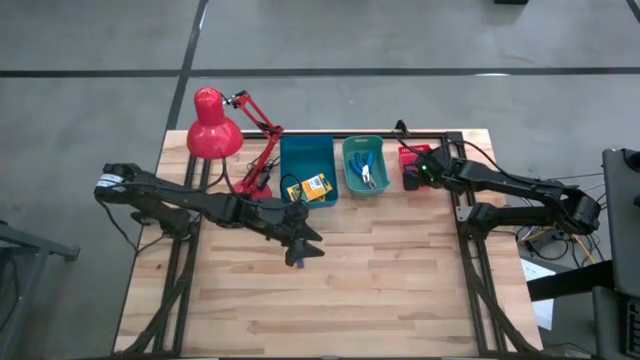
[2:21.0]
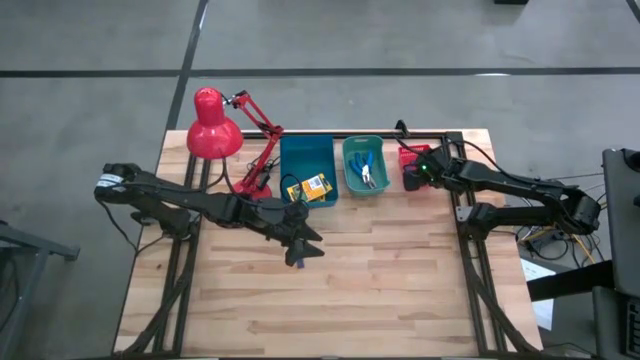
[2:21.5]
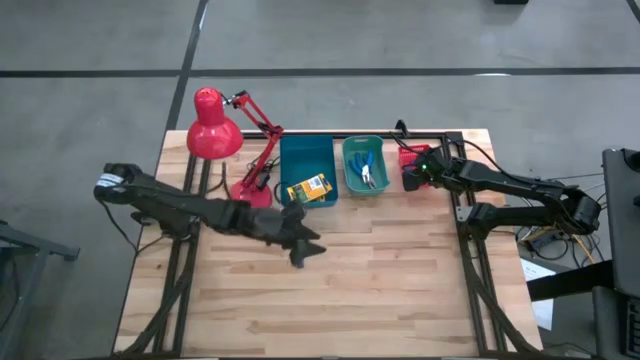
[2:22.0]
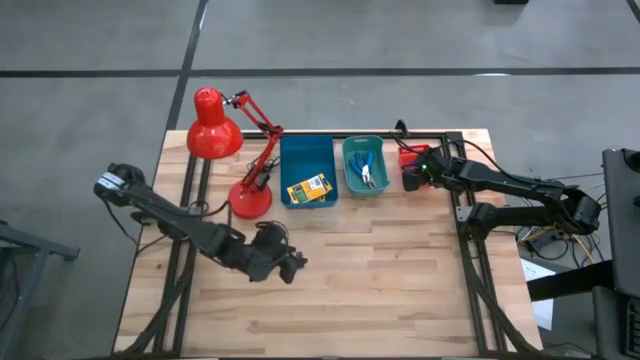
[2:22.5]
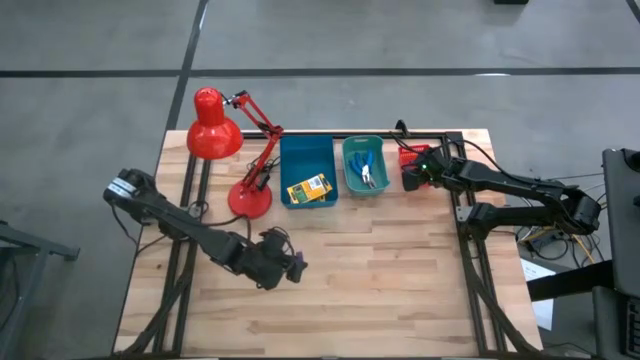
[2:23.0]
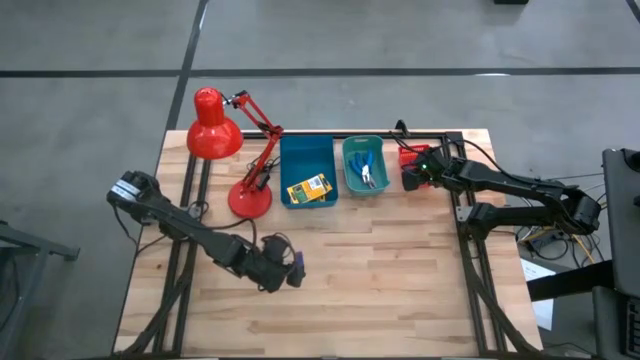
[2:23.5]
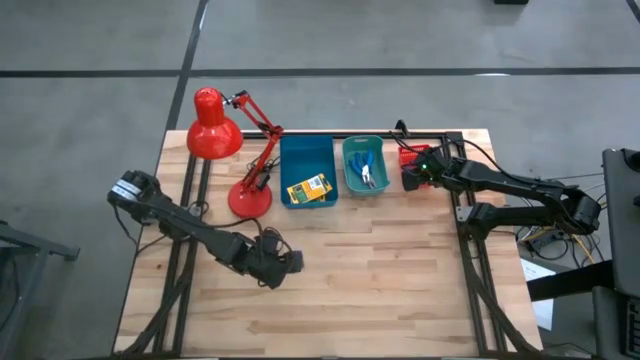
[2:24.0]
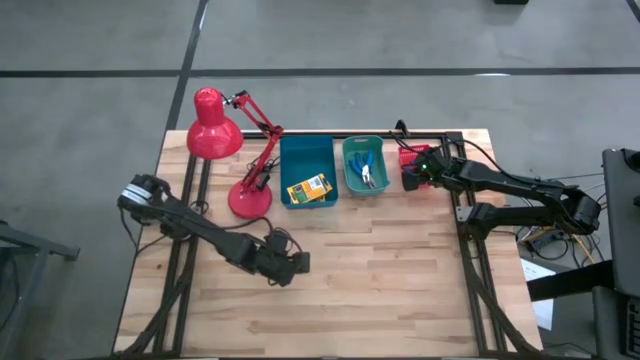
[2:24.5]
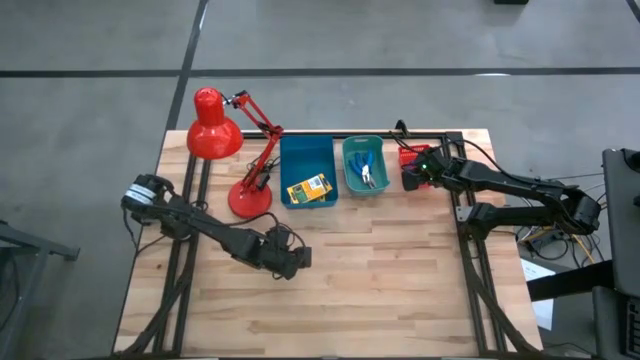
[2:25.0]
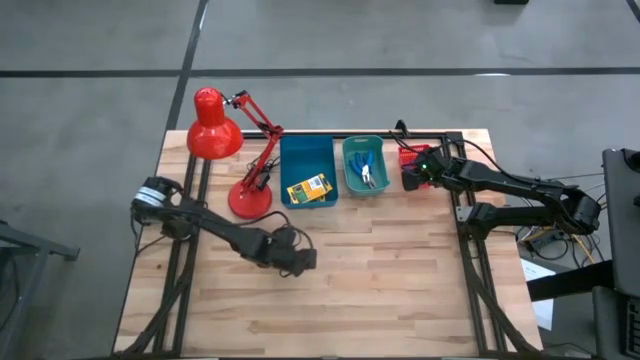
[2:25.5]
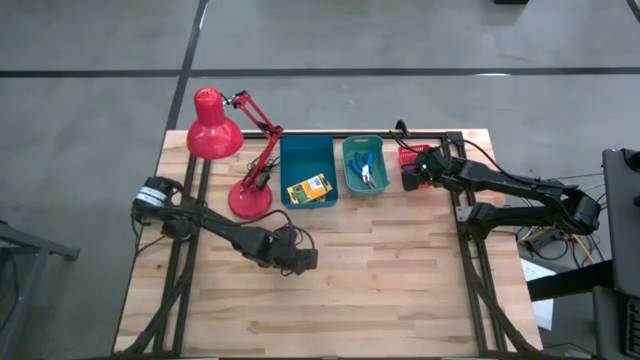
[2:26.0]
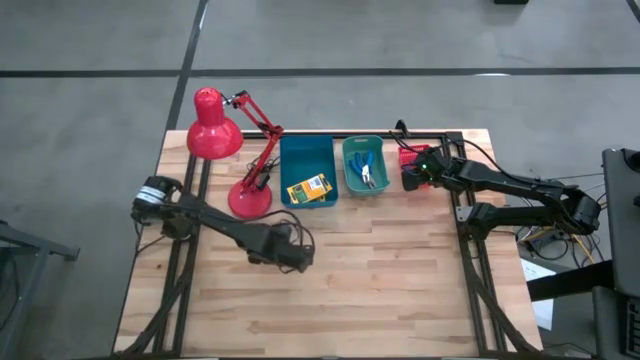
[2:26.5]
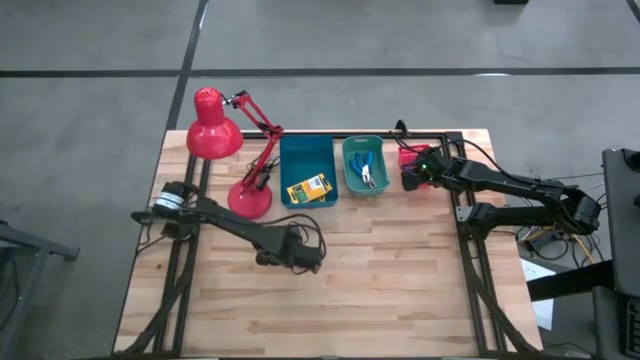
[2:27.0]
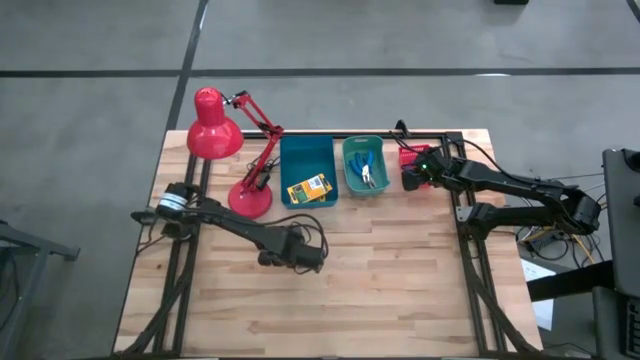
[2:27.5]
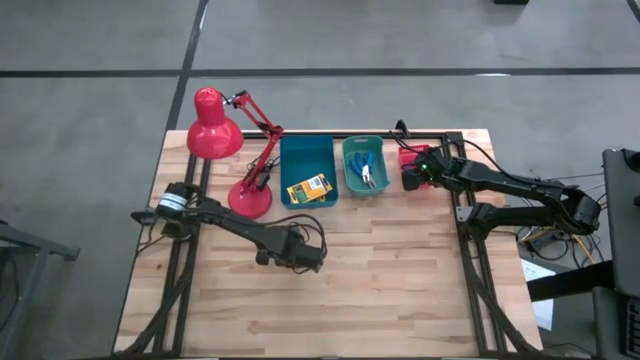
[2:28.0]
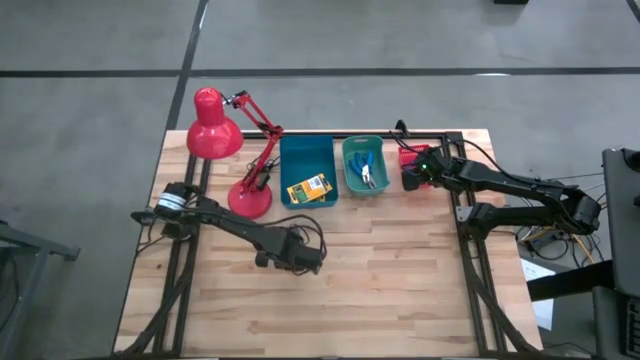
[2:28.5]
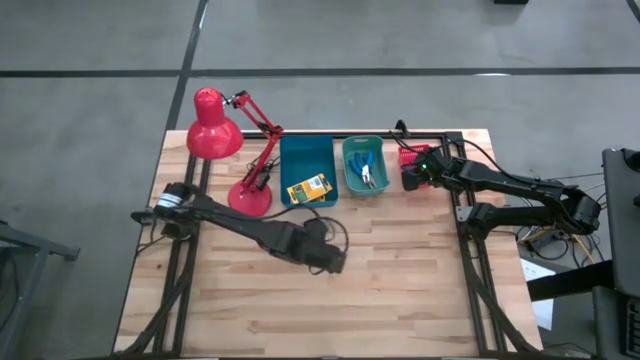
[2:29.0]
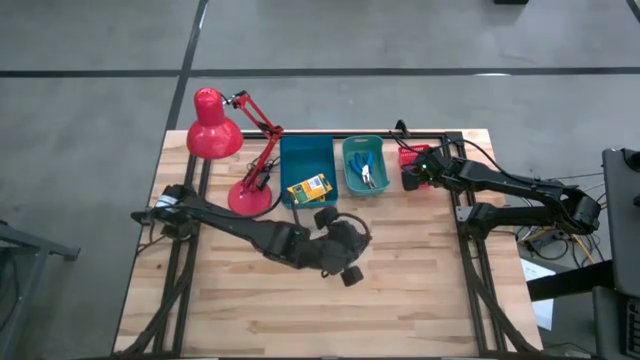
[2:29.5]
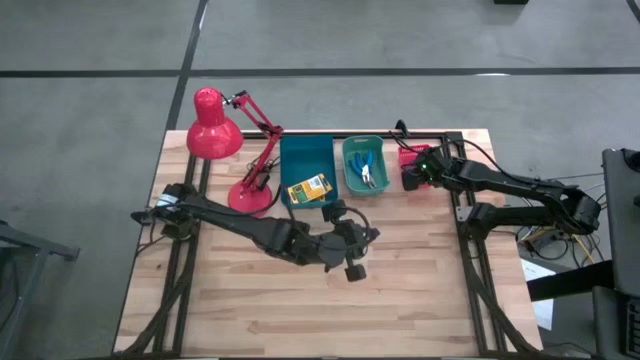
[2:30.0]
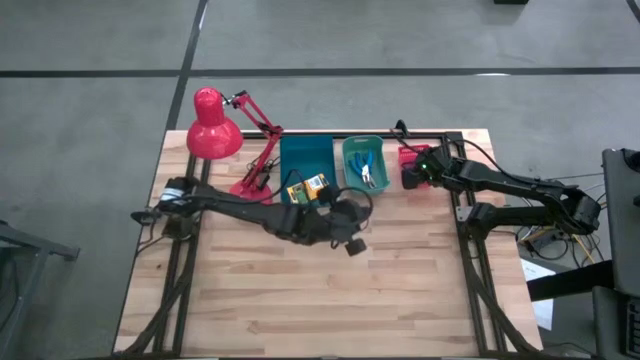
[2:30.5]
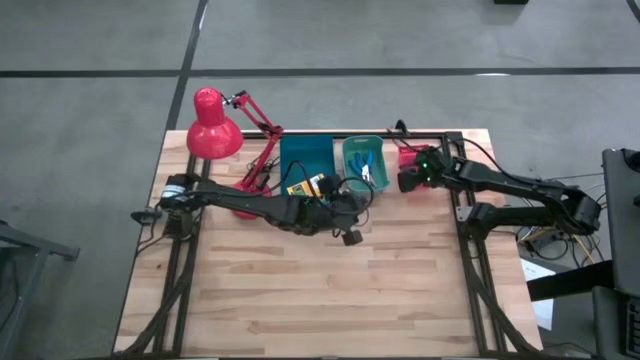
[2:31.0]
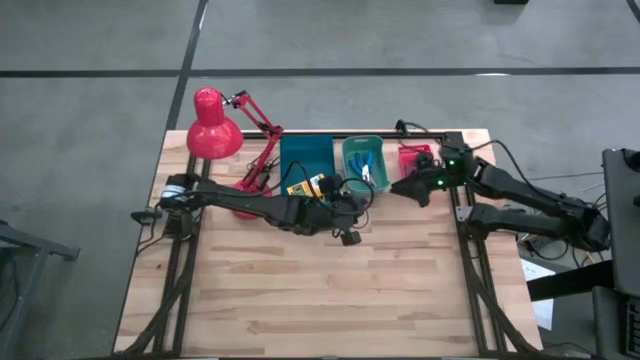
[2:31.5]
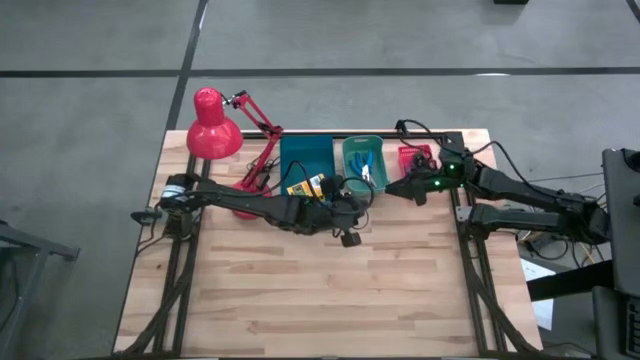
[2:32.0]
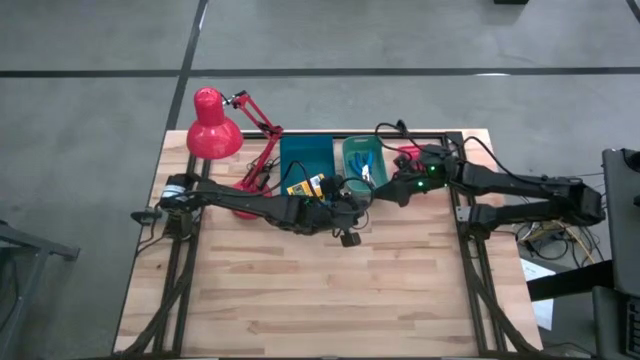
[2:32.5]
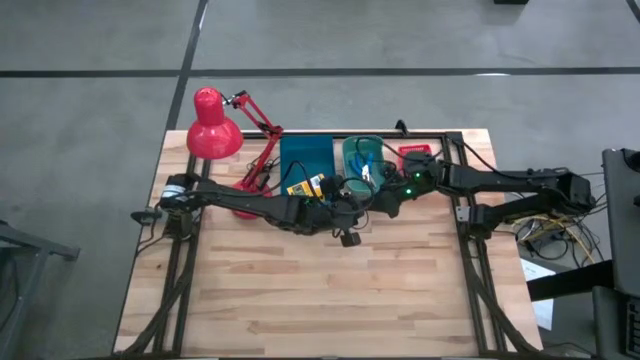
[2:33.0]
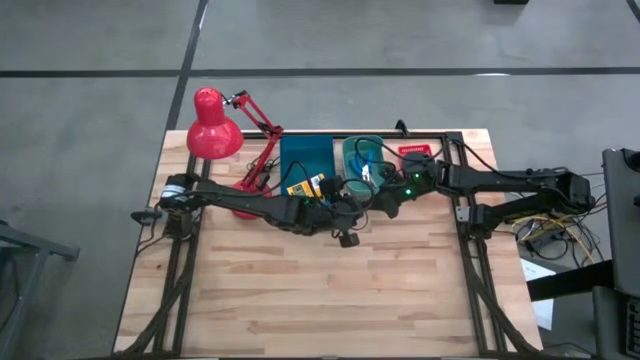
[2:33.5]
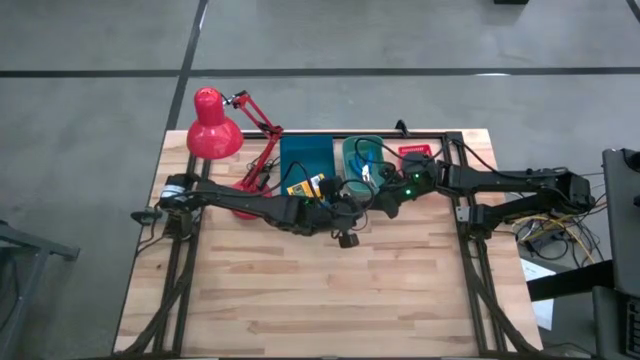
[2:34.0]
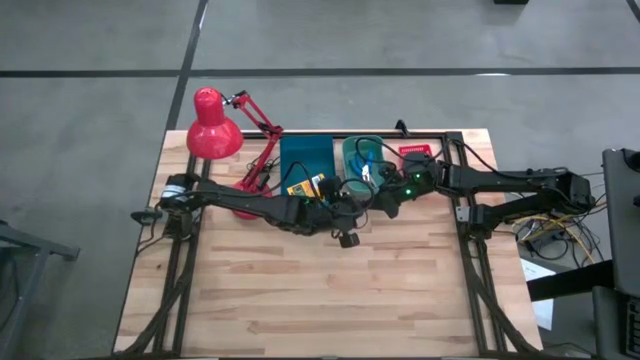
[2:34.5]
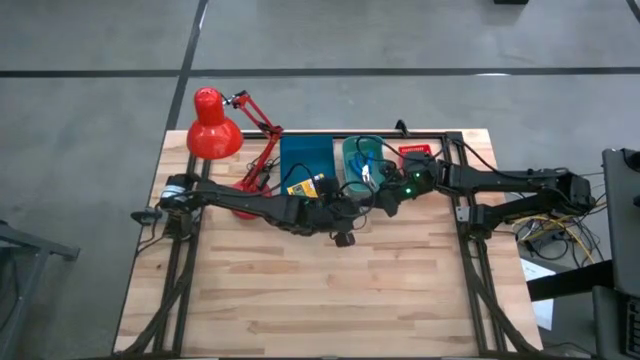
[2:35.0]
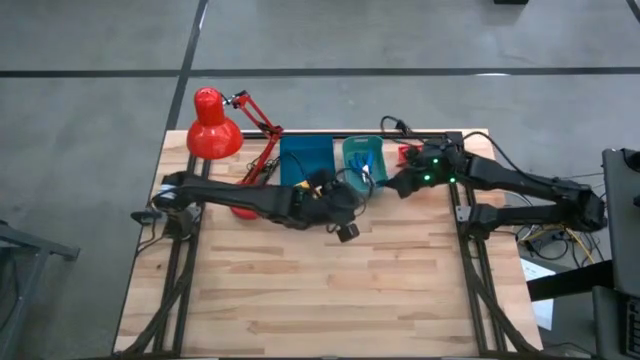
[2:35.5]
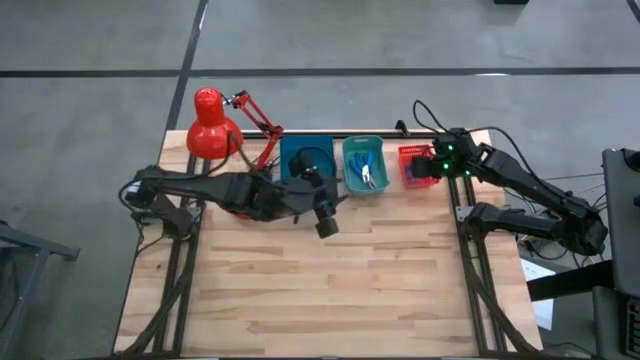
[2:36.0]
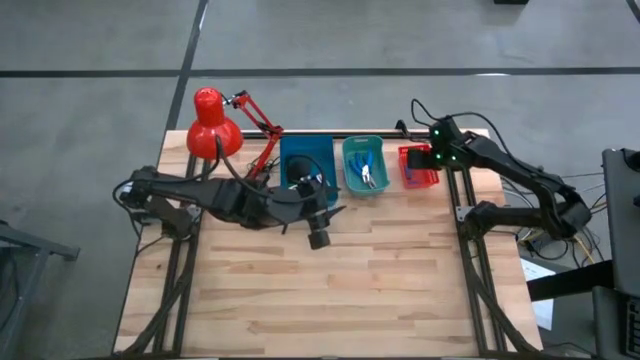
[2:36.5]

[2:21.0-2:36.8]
Task: Pick & Place School Supplies
Put the blue eraser into the red bin

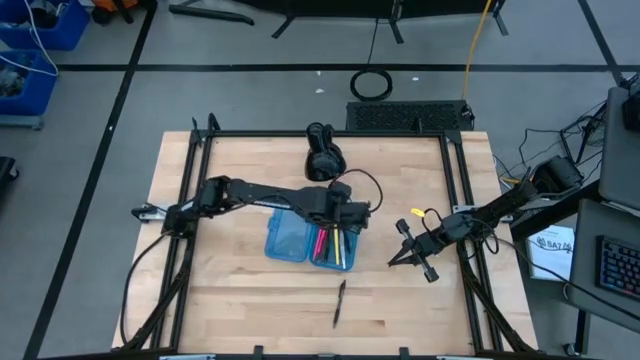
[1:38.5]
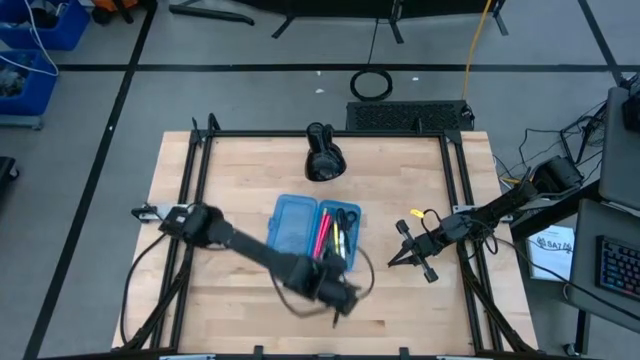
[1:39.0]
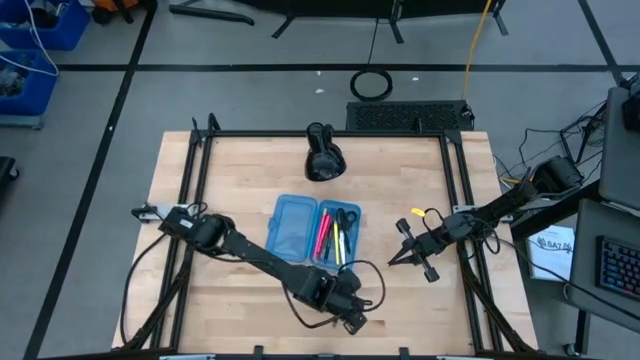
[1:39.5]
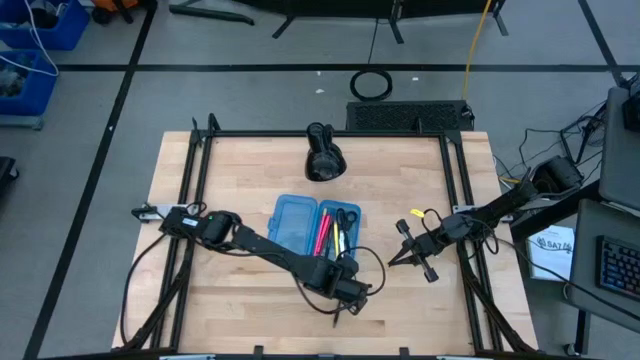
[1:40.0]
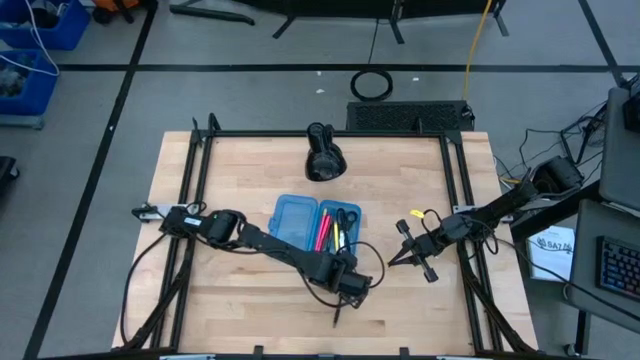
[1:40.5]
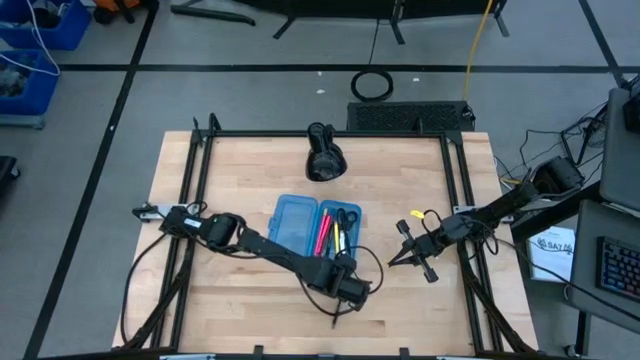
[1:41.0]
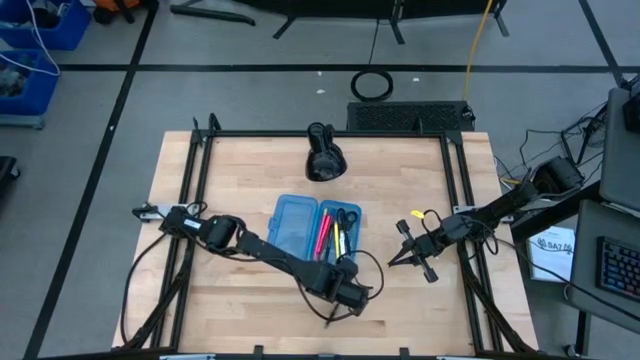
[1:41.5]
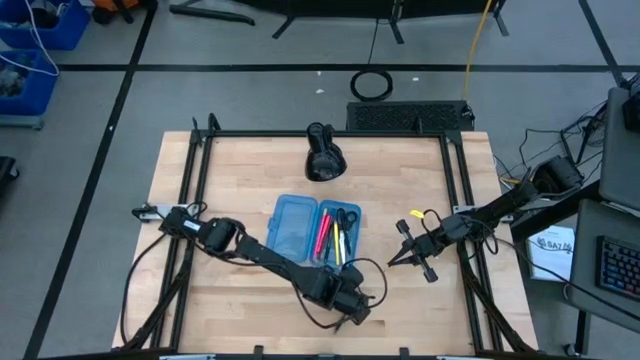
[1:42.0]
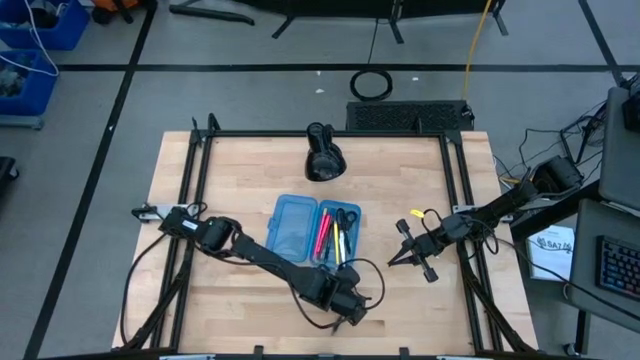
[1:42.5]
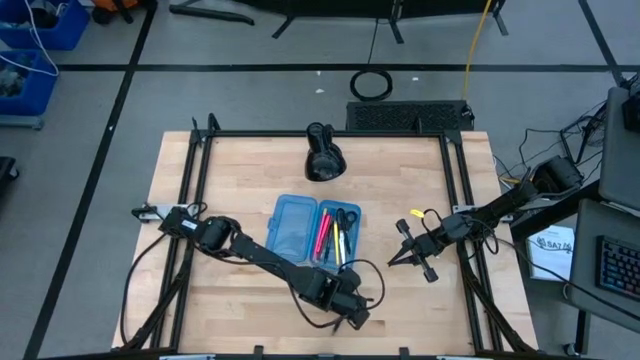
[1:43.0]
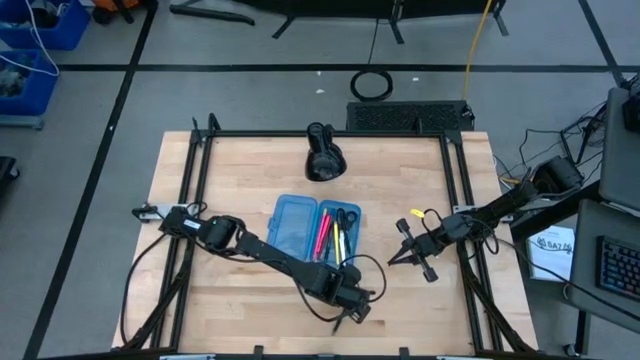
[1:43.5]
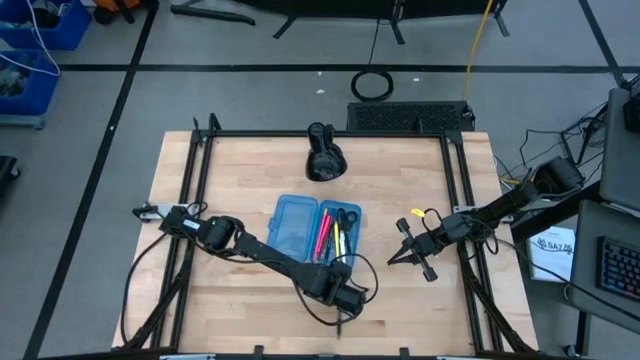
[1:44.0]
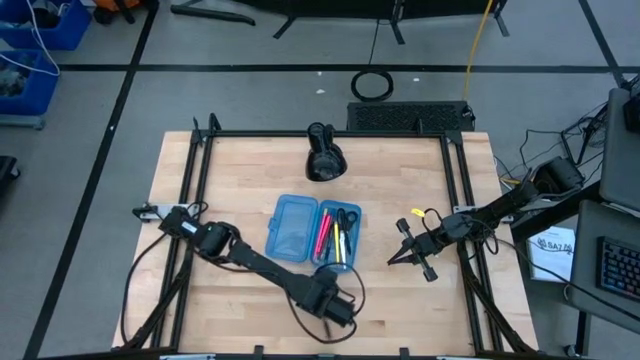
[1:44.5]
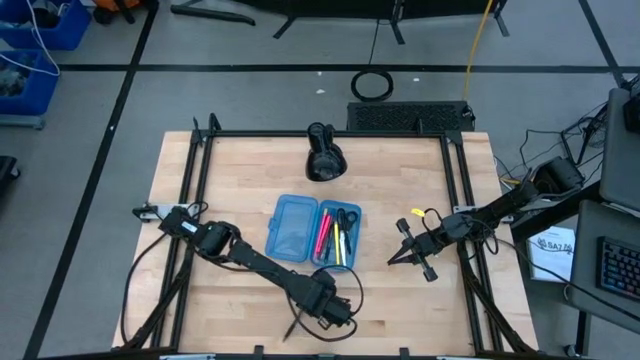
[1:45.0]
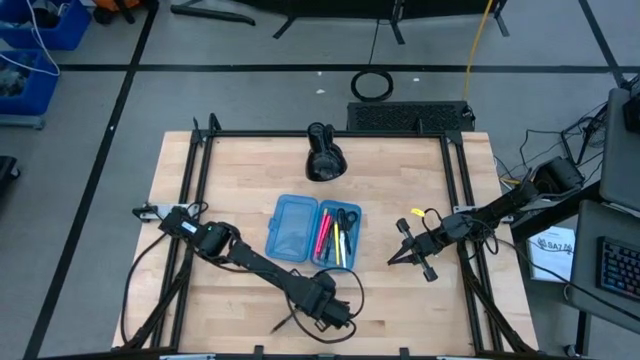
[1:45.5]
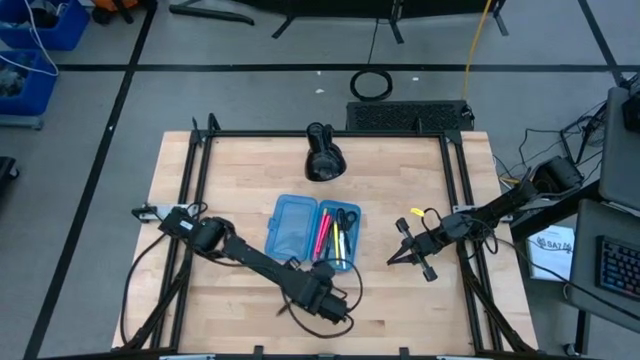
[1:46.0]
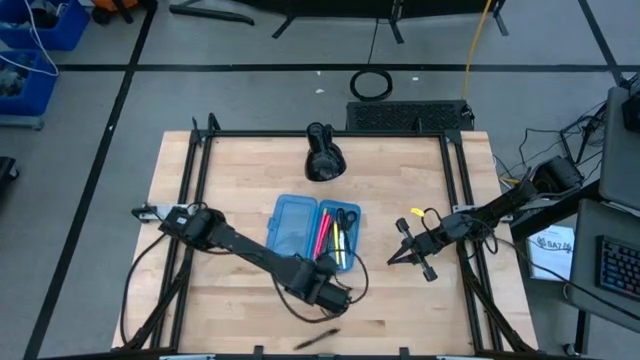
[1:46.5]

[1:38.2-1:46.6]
Task: Pick & place school supplies into a supply box
Put the black pen into the blue supply box
